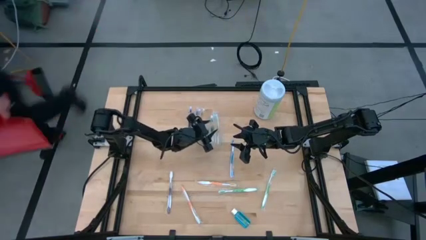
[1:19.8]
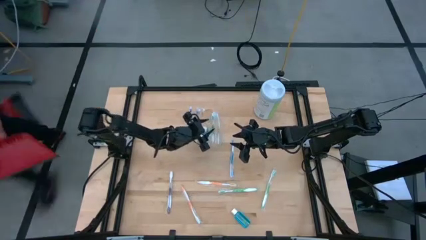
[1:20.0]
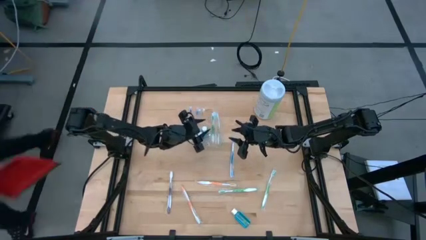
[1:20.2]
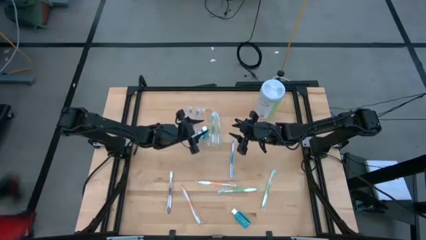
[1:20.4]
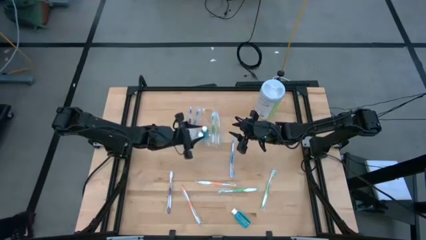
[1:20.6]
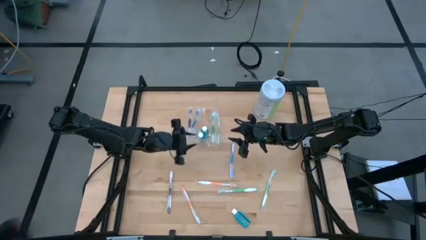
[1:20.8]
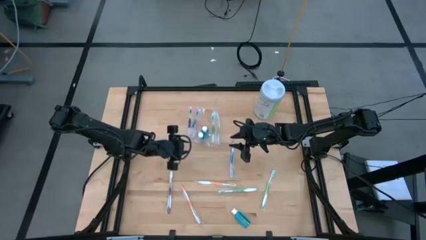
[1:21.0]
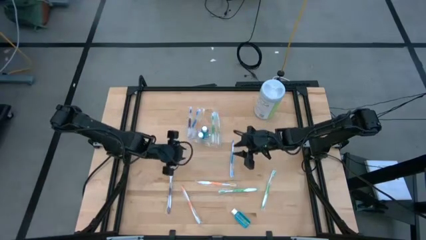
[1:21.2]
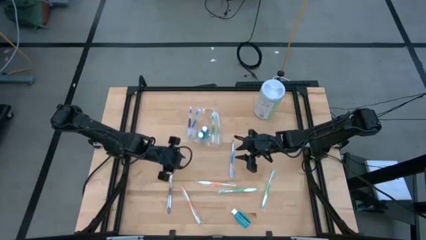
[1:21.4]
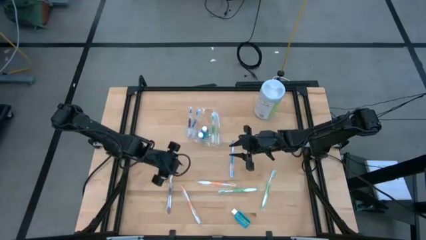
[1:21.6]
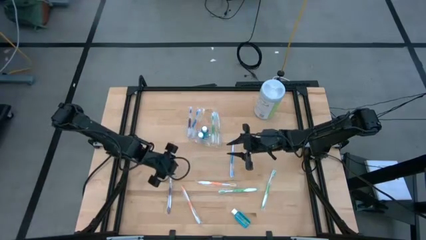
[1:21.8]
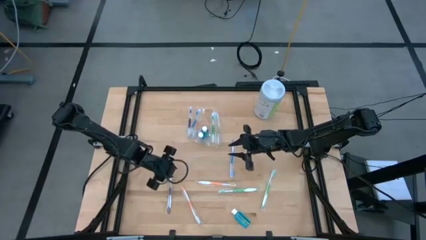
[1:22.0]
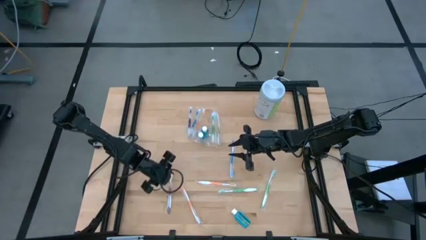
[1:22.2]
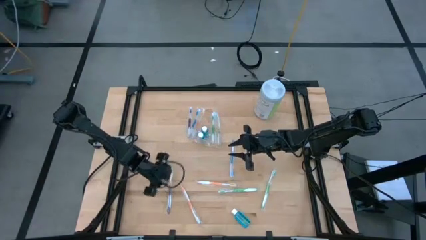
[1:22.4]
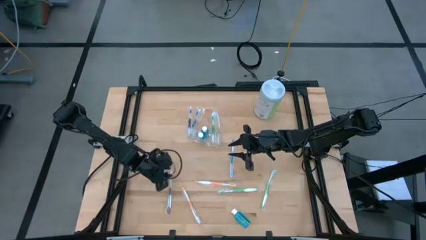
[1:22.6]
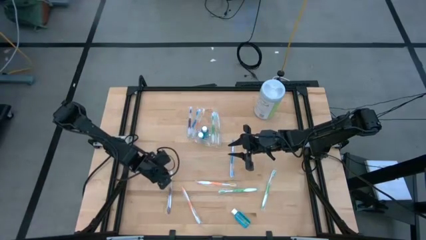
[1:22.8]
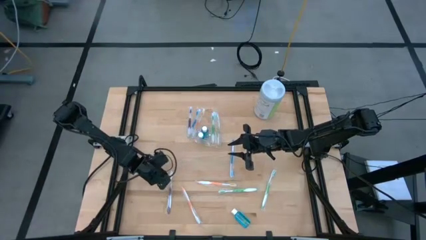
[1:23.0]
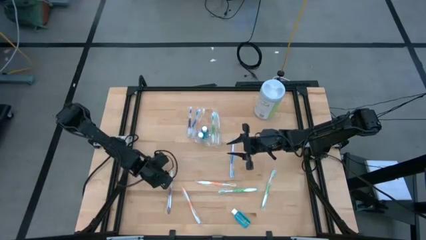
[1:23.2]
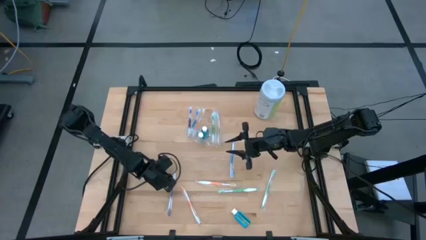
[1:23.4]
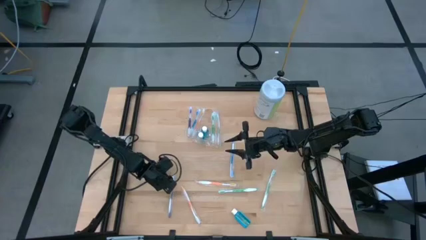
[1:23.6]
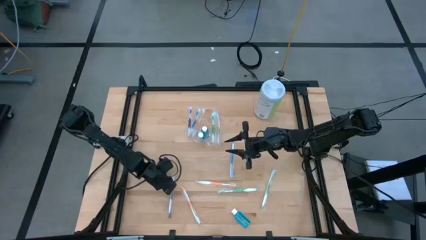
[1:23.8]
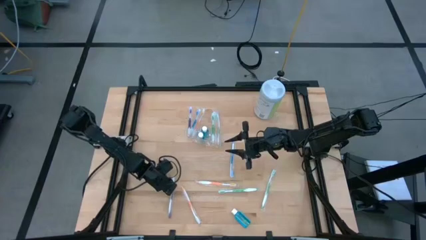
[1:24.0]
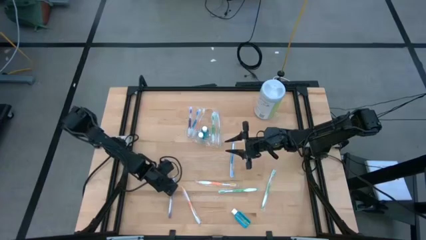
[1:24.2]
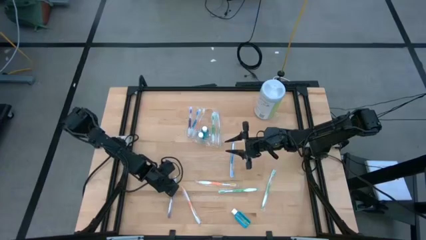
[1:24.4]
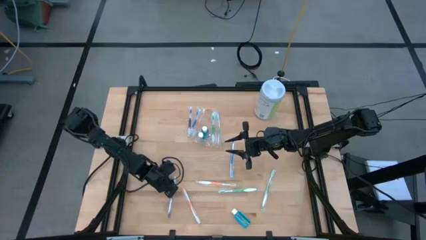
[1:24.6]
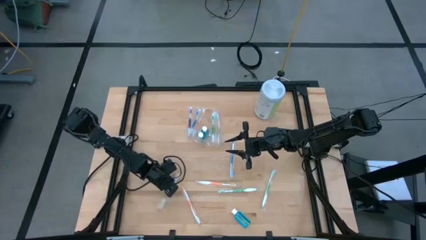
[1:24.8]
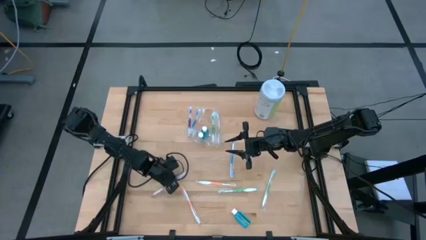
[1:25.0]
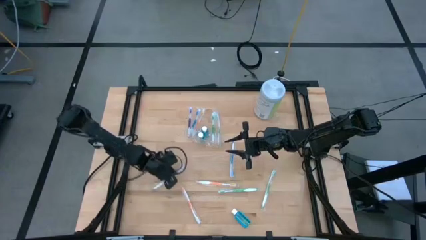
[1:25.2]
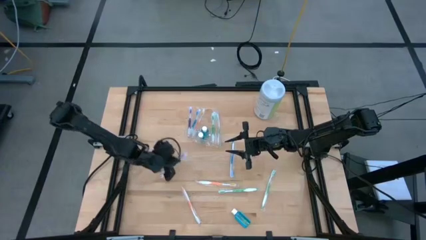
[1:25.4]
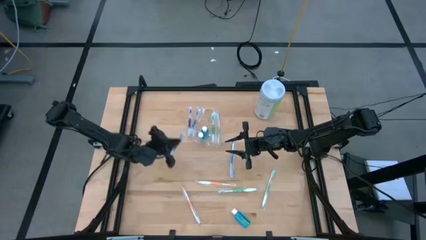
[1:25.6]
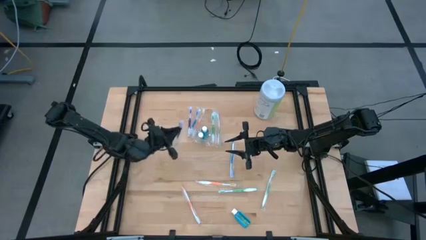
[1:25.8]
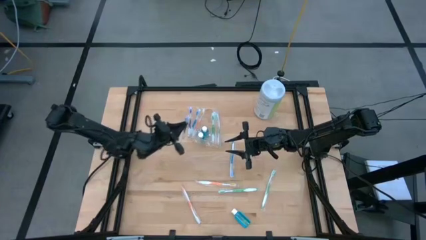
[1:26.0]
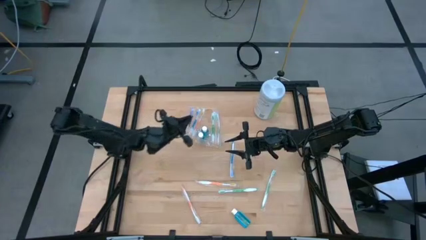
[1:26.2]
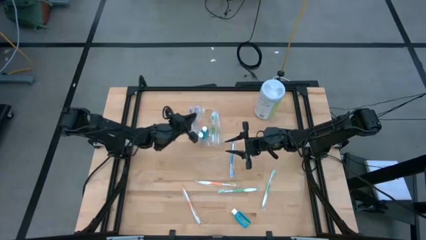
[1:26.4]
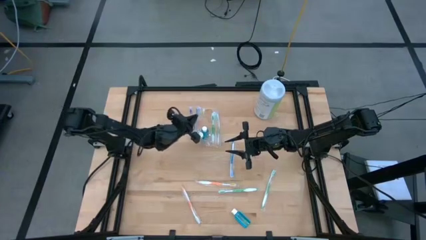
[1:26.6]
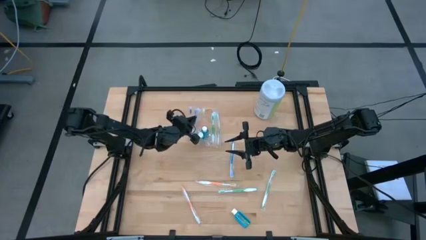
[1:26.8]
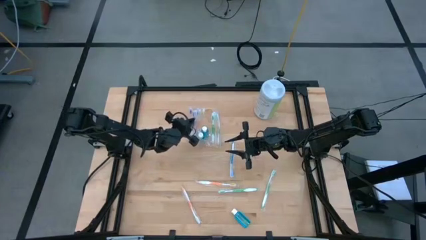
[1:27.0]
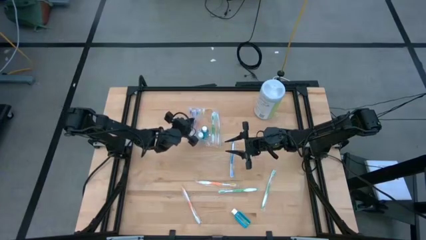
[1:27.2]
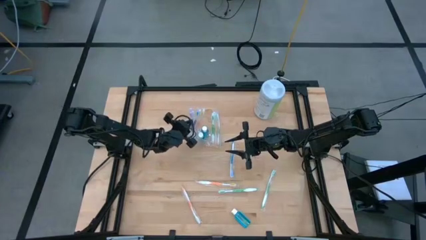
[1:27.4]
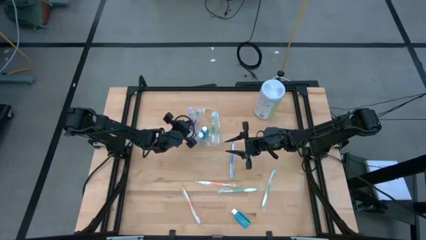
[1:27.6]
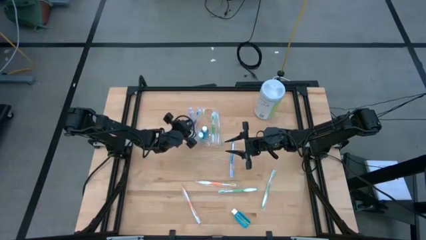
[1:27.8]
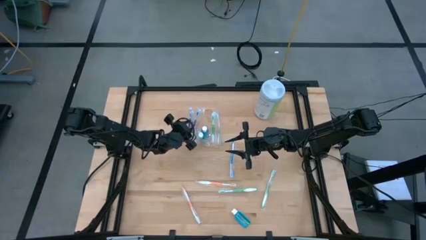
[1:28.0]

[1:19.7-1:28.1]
Task: Pick & Place toothbrushing station
Put the violet toothbrush into the transparent organizer

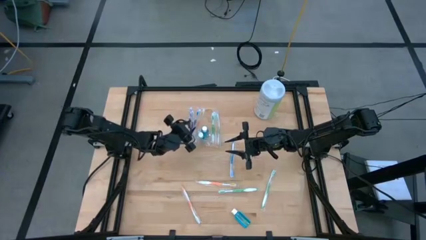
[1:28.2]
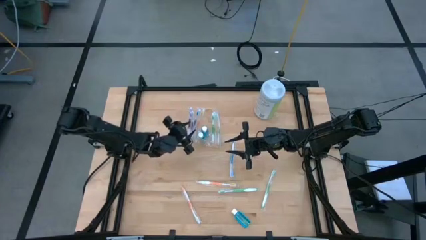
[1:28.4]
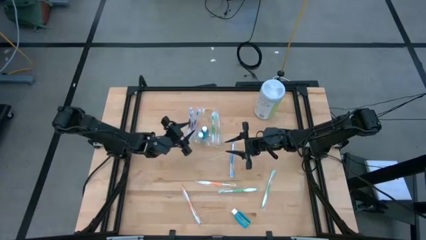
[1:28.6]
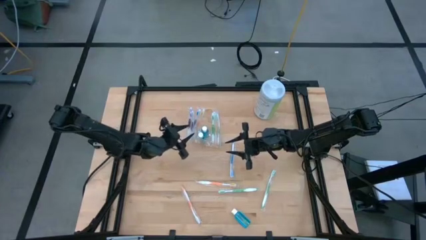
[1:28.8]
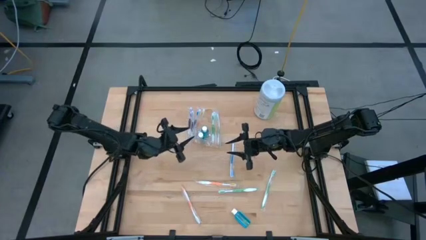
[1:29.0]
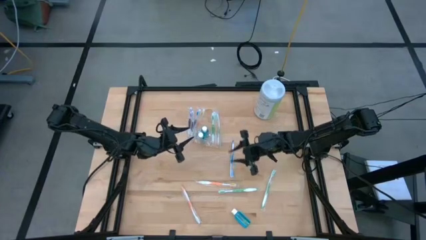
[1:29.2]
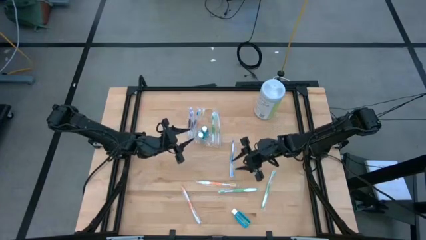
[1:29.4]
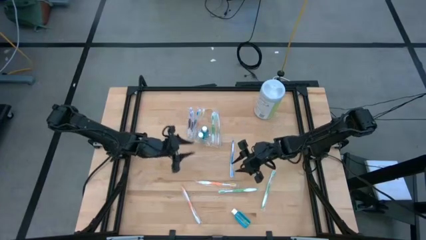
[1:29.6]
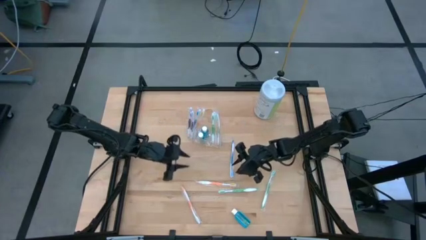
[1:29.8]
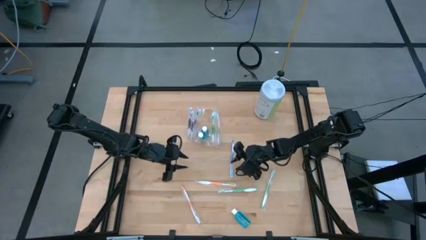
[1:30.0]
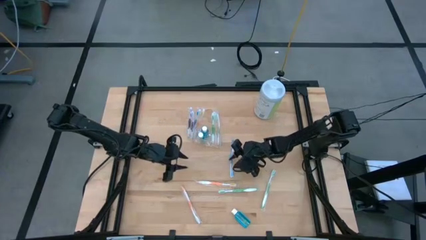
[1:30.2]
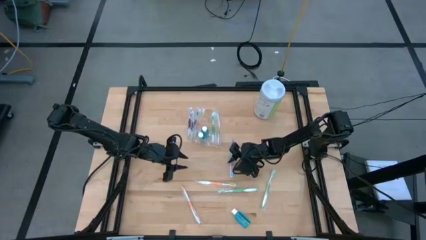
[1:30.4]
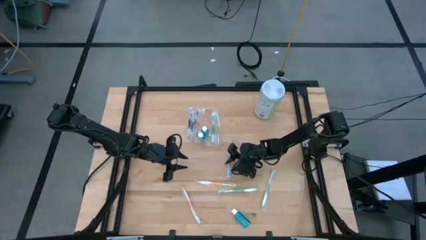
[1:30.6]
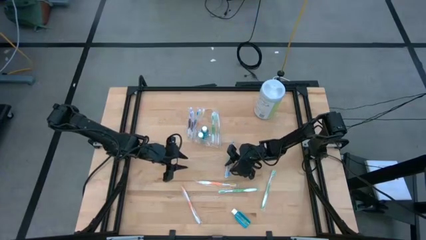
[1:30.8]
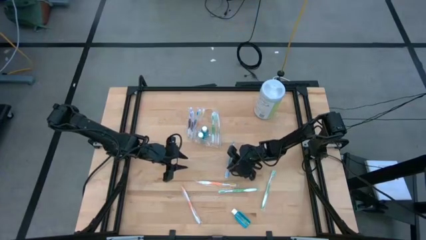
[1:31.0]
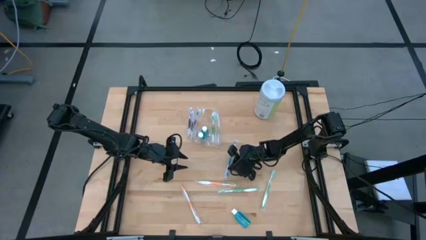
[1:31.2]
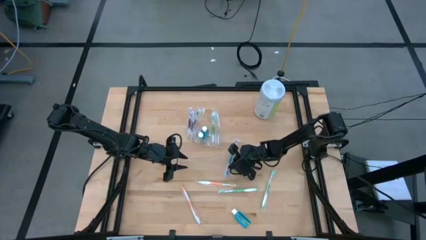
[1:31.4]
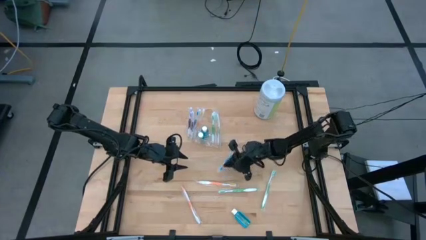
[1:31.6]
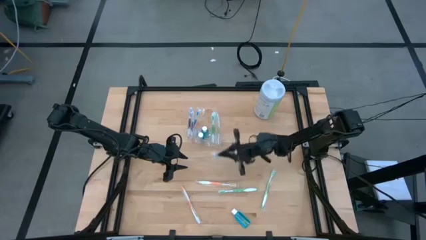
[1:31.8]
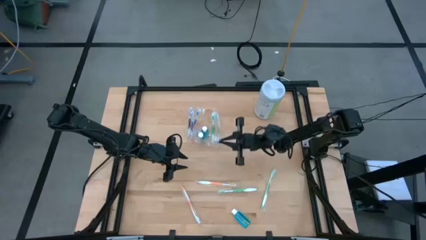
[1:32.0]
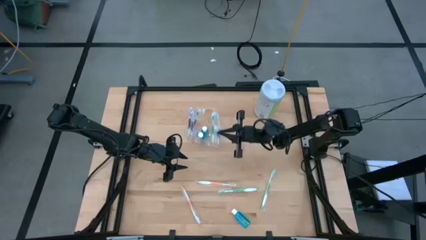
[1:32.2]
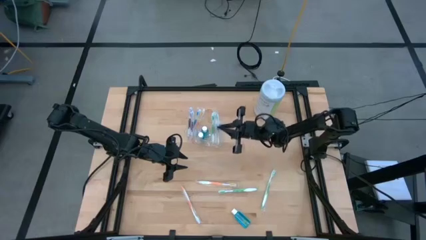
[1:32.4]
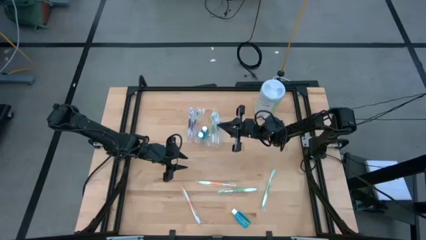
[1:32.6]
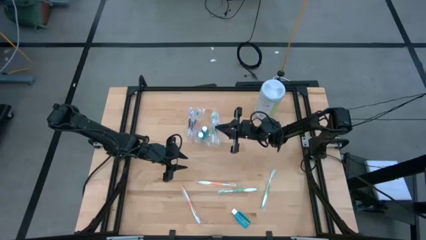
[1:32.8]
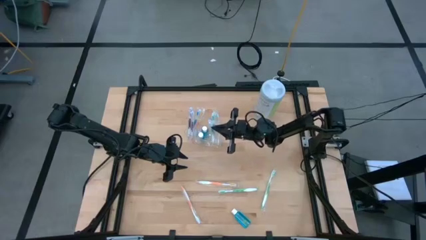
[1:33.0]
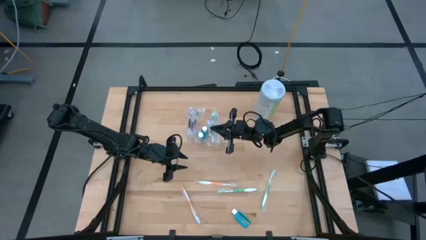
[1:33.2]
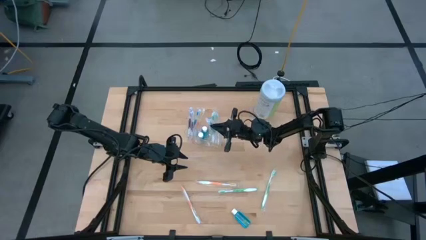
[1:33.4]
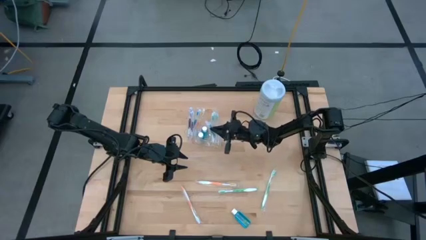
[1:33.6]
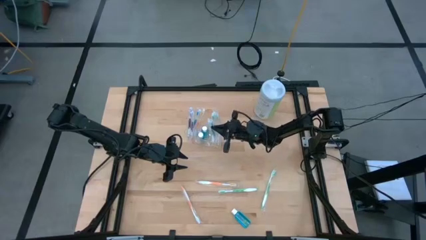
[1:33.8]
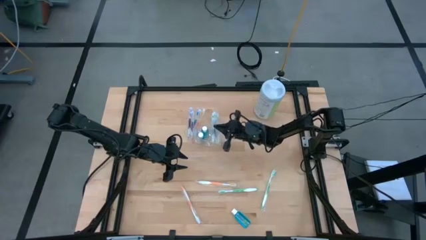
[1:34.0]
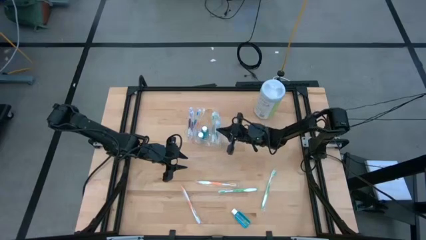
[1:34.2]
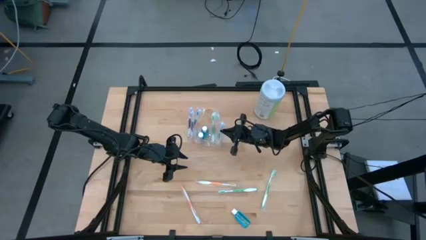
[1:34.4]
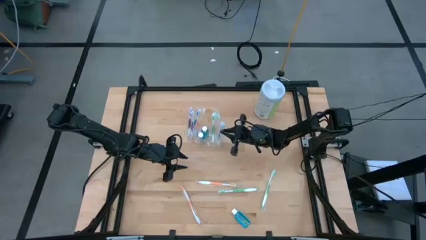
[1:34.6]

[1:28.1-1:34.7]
Put the blue toothbrush into the transparent organizer
